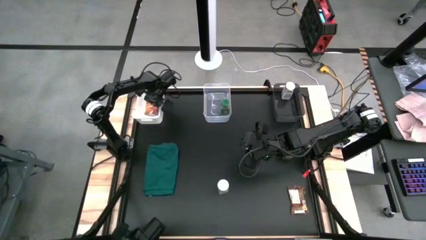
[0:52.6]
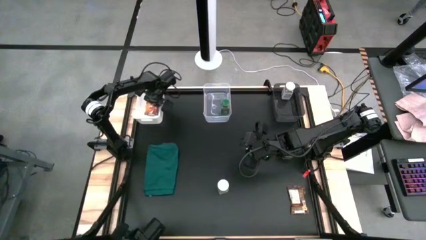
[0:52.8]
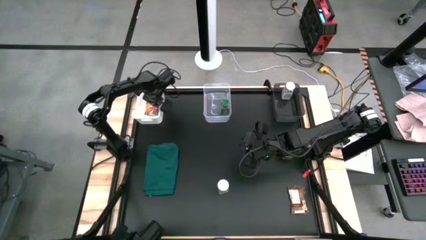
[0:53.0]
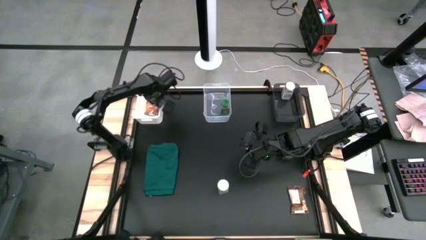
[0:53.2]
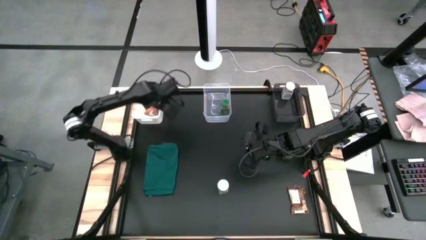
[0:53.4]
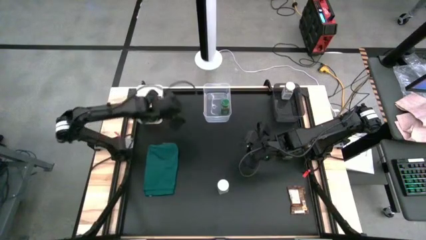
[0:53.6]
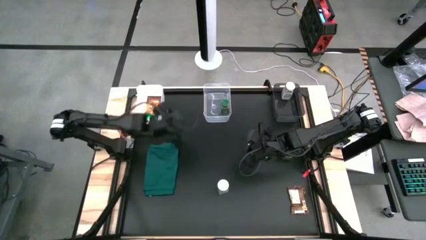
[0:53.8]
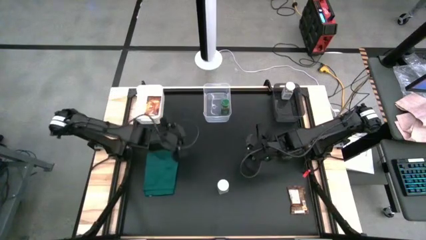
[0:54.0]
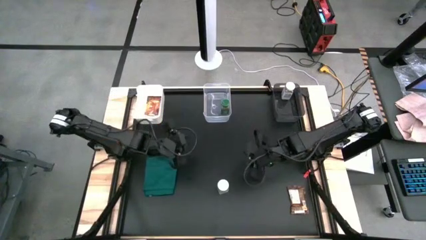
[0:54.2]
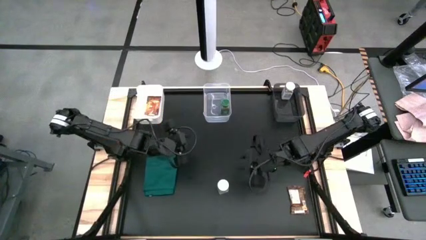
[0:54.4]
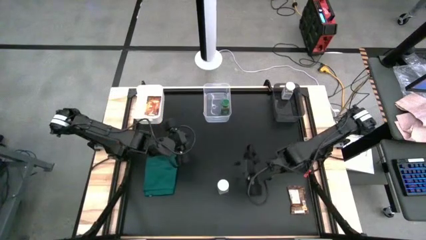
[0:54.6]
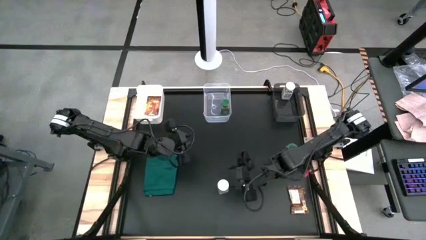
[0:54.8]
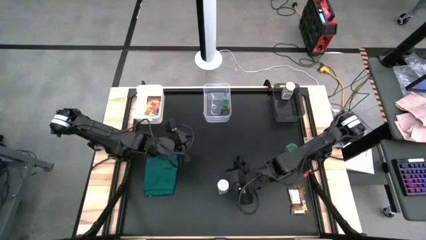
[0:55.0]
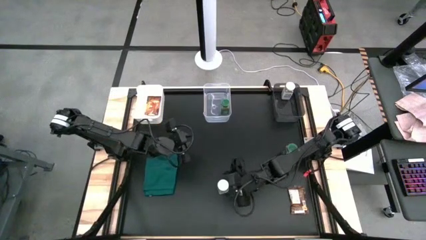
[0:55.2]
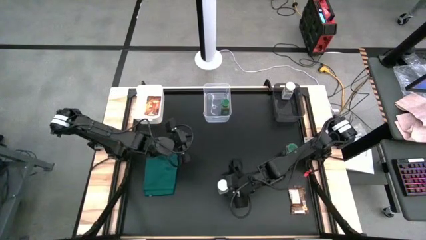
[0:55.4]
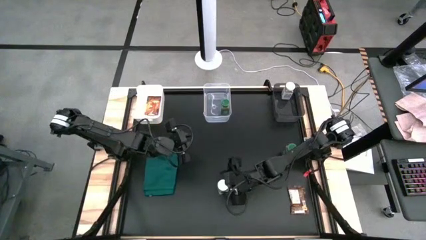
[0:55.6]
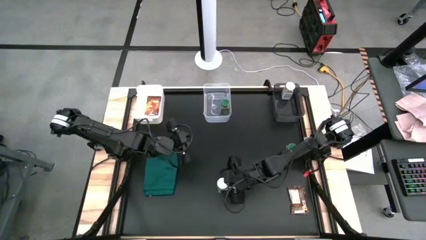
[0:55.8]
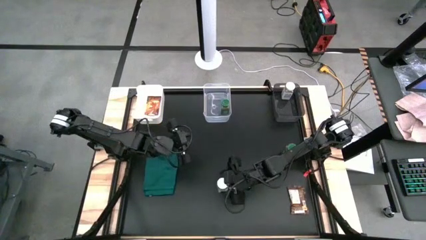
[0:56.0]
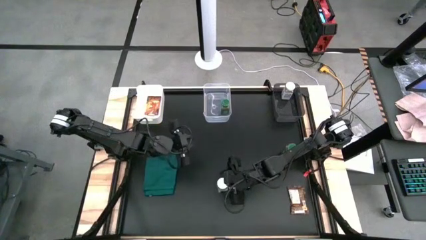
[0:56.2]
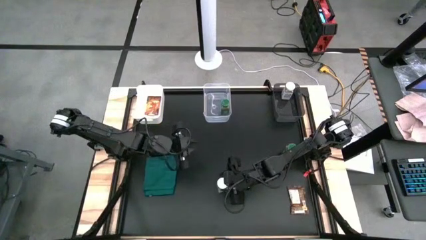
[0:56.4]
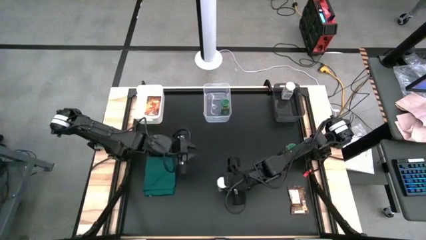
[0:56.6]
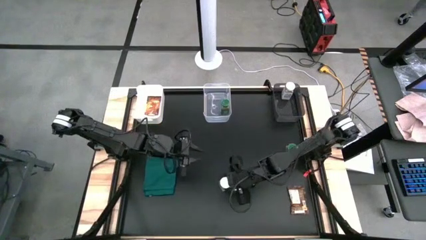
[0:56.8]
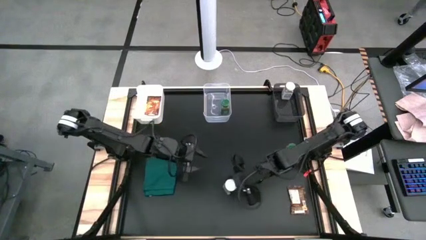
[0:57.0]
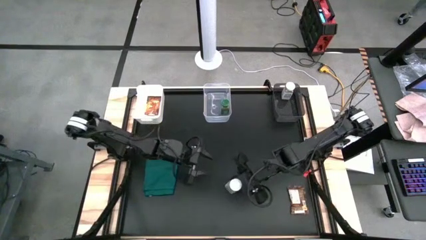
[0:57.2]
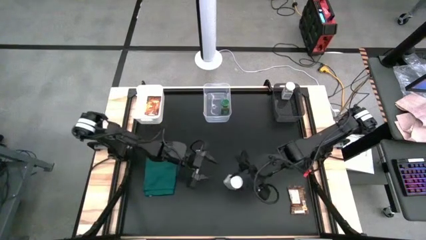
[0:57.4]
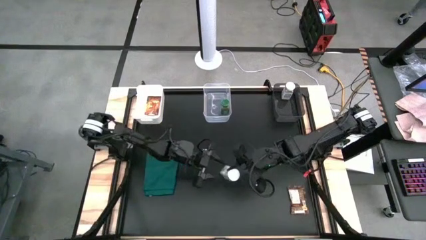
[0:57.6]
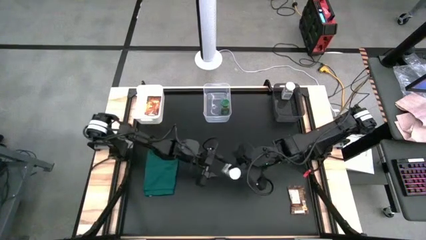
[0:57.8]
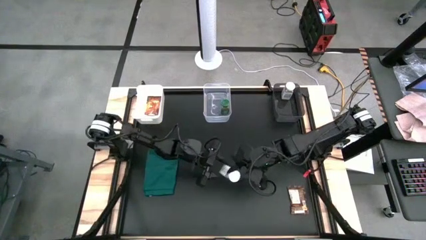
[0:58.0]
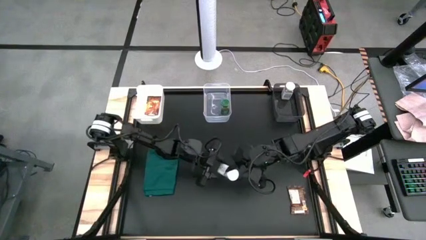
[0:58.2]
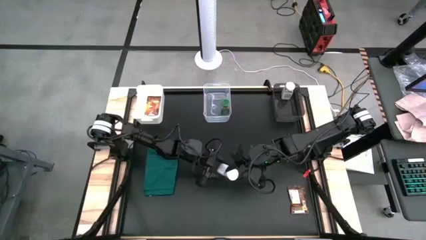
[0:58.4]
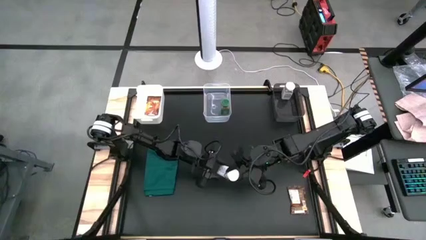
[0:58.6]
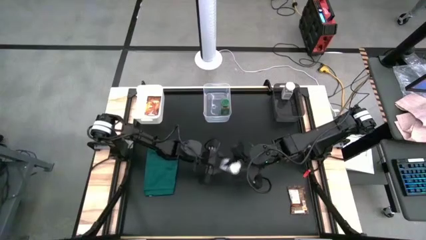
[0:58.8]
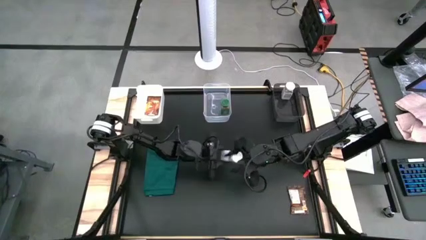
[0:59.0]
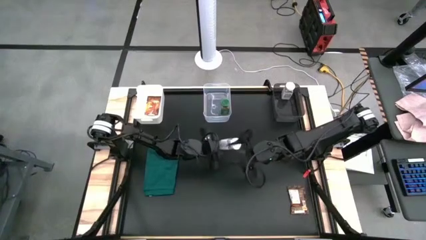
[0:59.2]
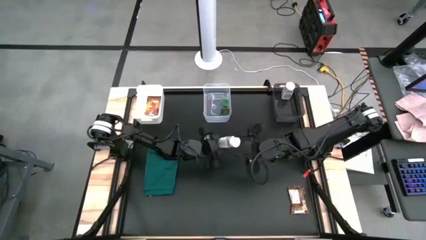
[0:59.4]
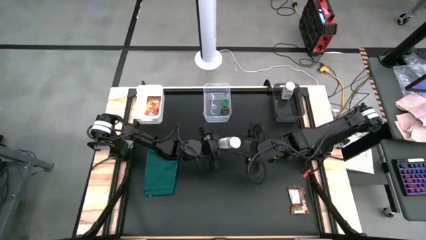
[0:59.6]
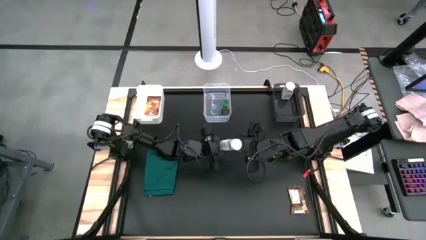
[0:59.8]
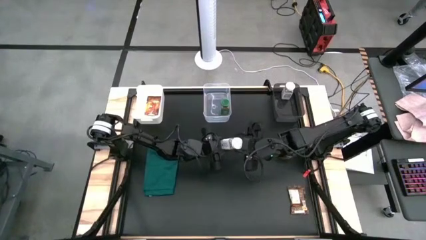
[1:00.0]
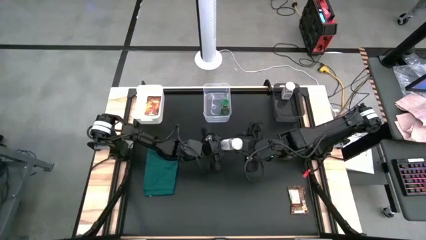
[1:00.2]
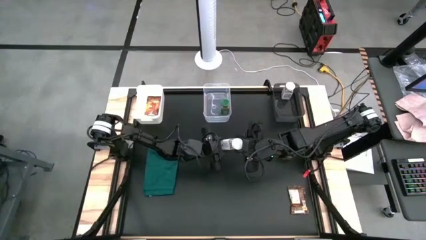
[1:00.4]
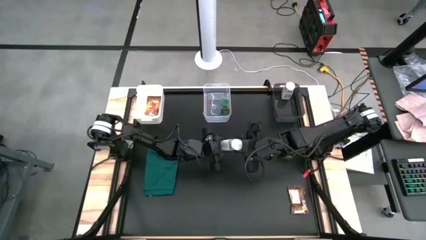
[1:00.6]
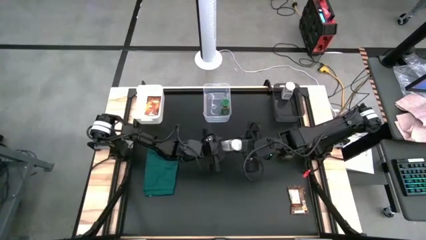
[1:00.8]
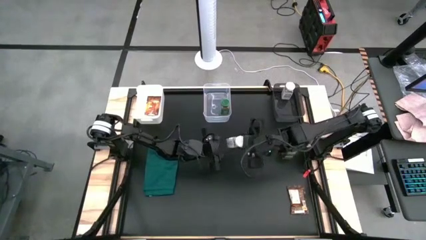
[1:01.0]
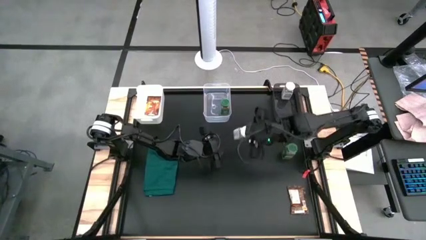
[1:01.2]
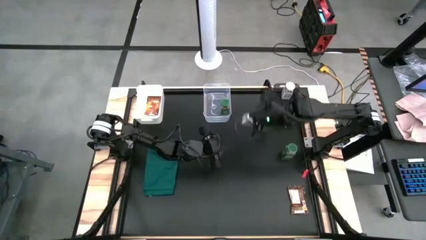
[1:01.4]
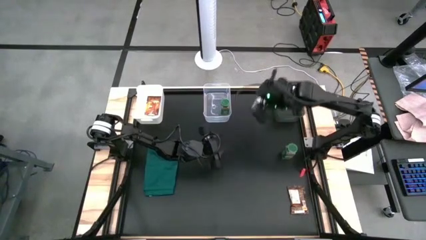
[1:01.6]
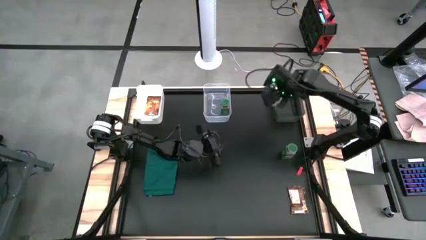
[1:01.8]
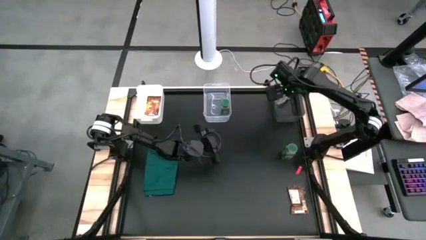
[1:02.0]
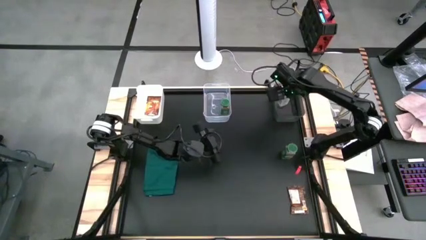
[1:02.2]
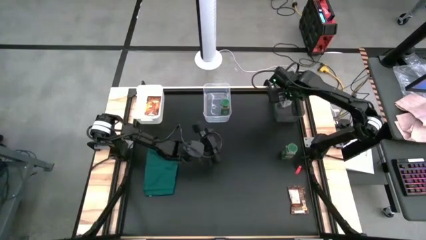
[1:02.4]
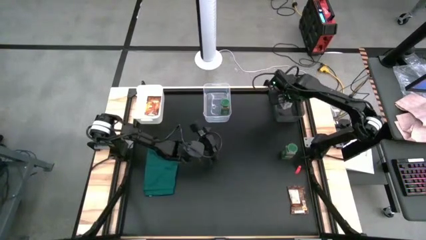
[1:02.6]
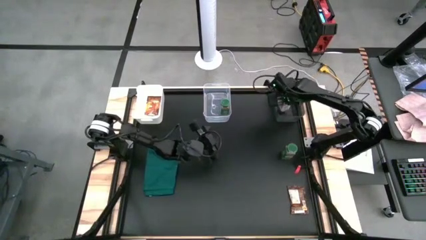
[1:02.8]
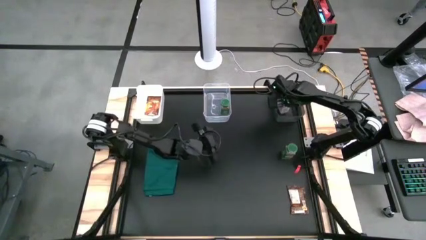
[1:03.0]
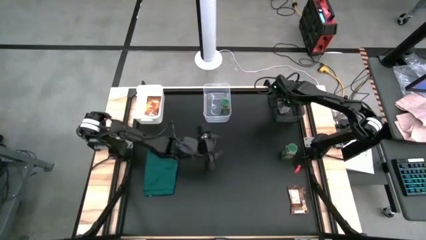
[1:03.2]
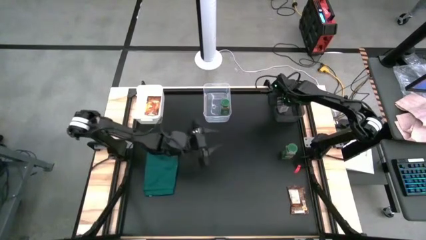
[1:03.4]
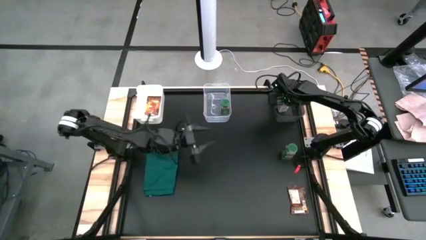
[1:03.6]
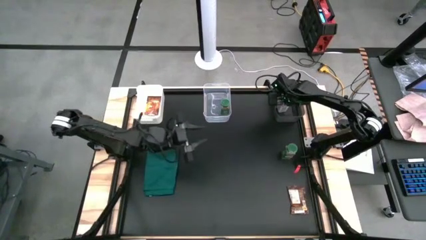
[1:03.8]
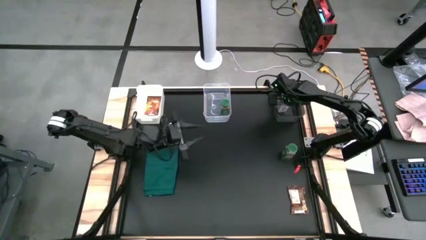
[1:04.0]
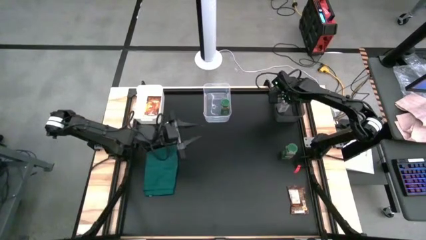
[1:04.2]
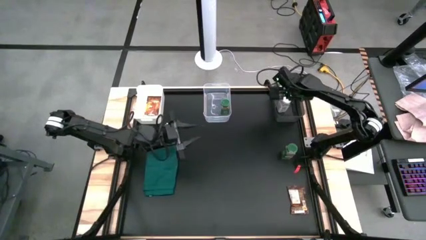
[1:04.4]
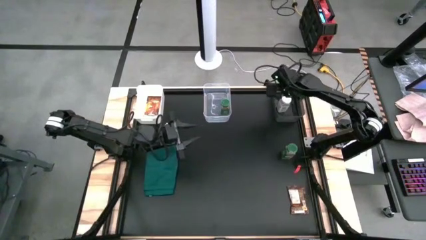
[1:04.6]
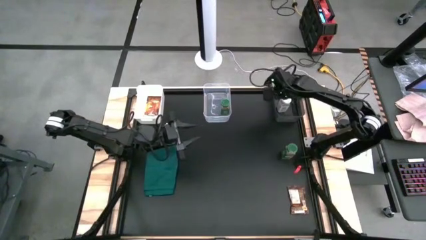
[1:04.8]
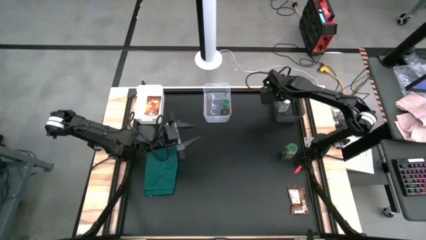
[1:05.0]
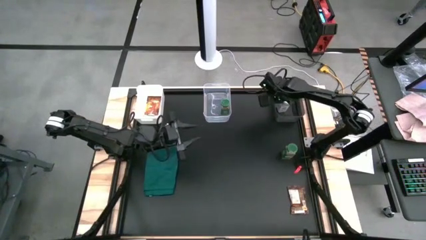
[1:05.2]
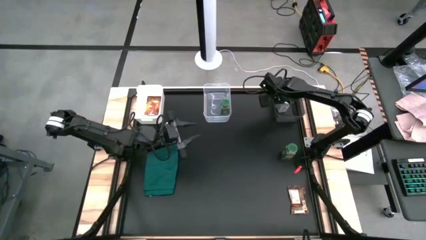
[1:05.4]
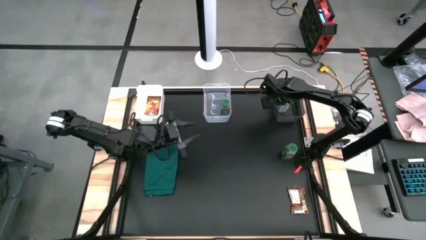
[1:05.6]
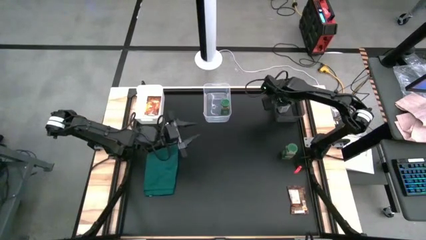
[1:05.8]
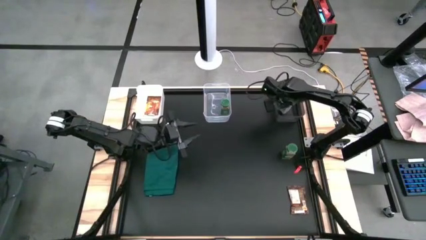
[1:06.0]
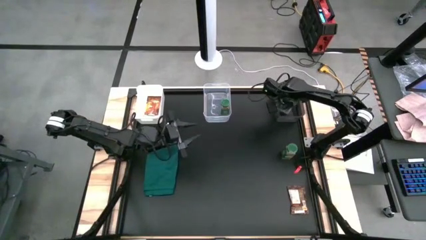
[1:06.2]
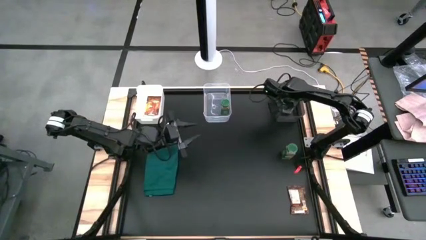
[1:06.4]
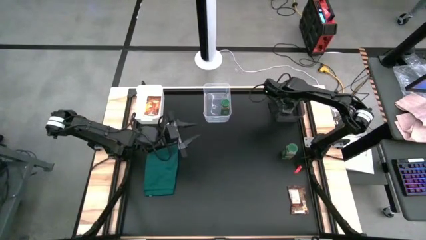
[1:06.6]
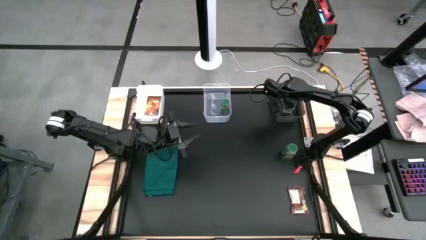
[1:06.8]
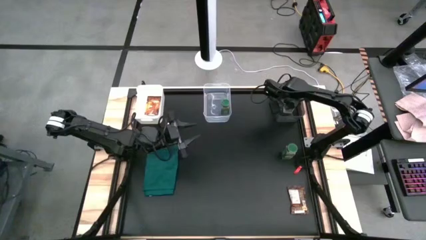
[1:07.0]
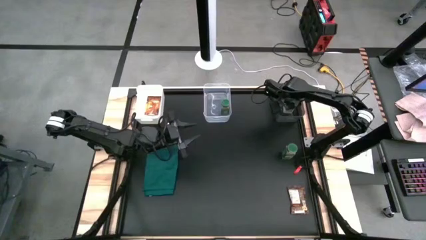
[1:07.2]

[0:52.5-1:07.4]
Task: Sort spices by type
Put the white seasoning bottle into the black bin

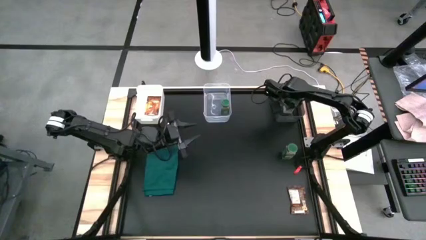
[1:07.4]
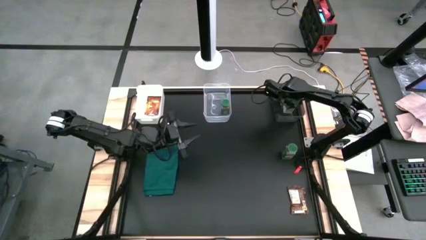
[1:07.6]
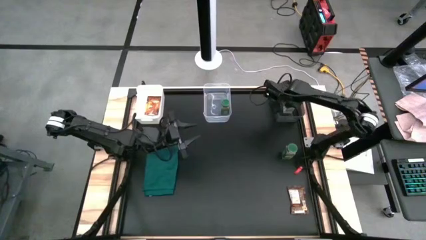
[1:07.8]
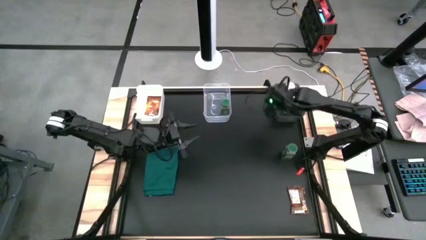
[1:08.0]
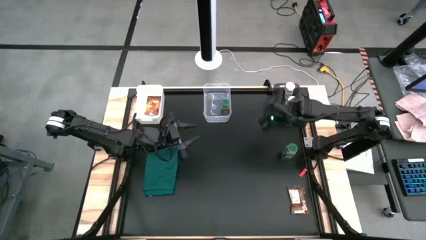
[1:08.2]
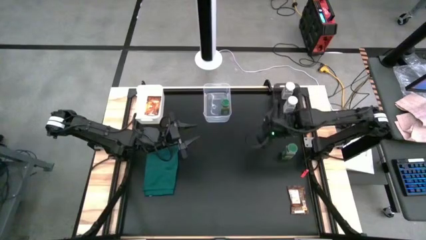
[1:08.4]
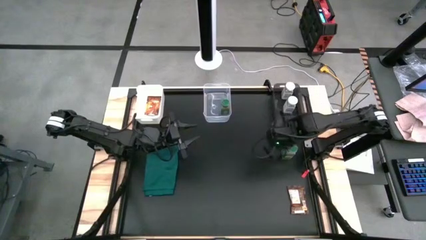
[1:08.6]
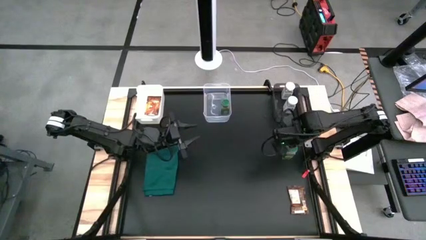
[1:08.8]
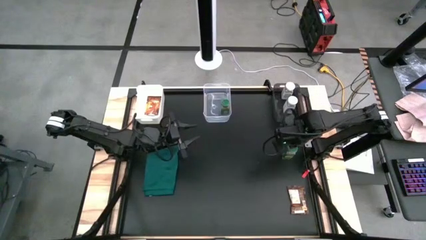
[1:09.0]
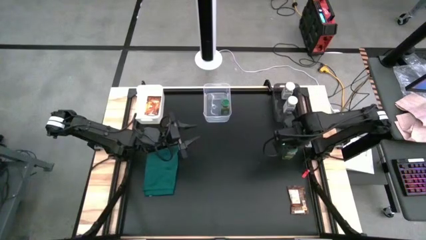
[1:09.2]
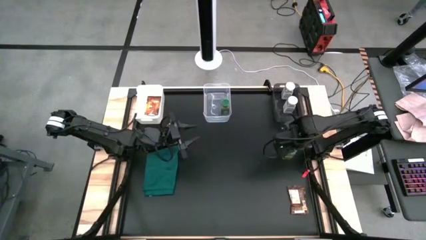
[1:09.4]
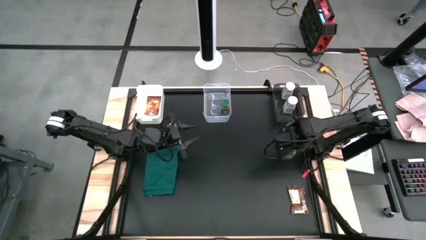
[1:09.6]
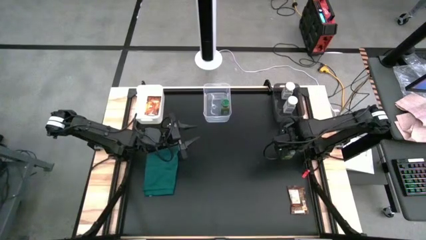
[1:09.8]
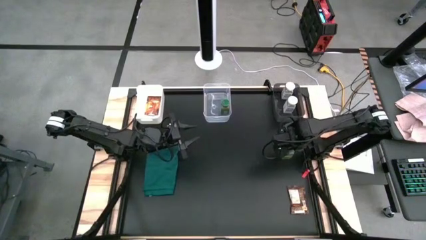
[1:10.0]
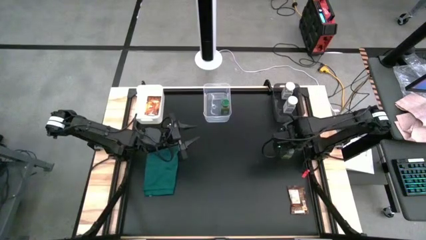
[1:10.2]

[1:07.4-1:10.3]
Put the green seasoning bottle into the transparent bin
